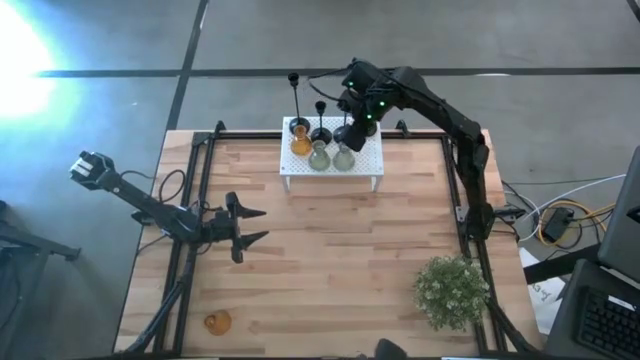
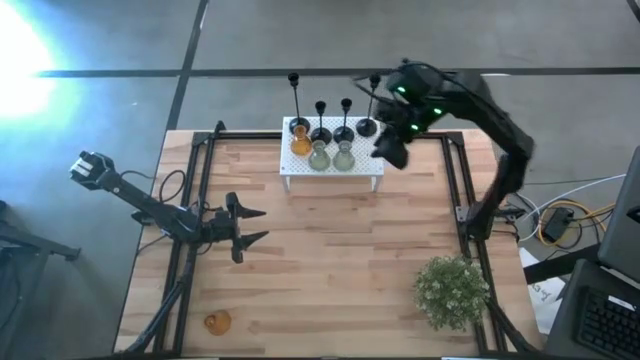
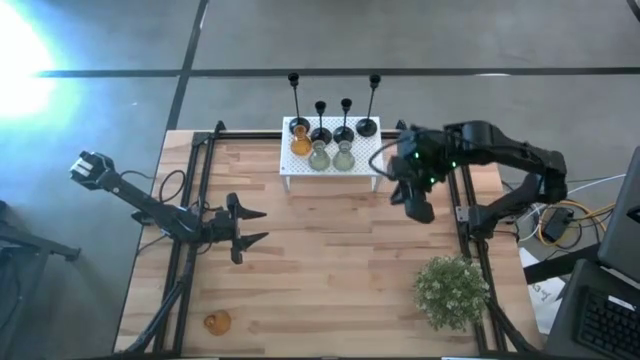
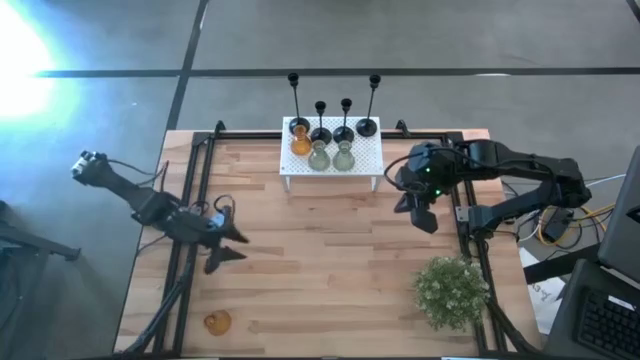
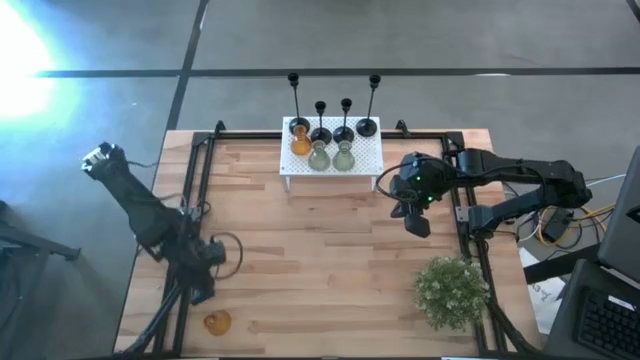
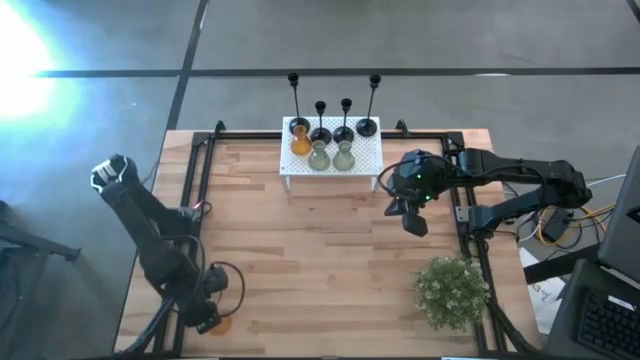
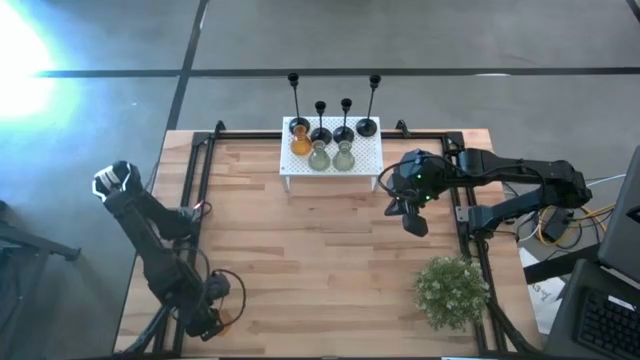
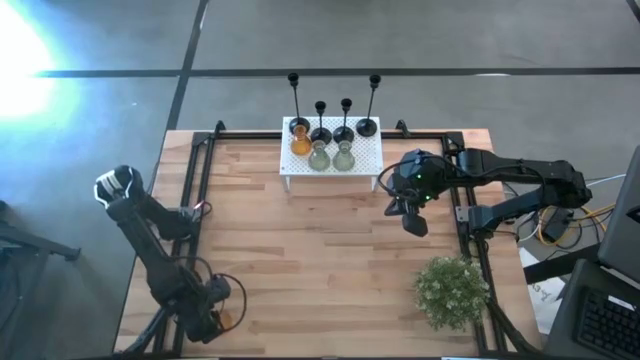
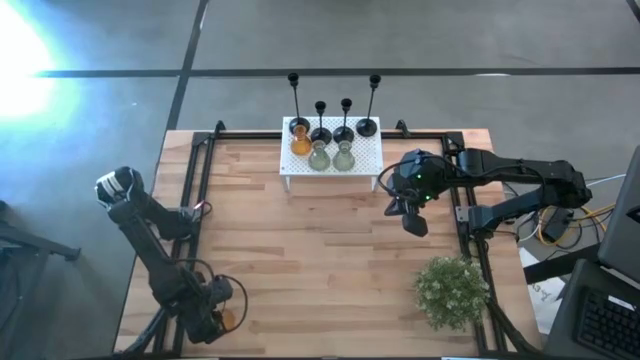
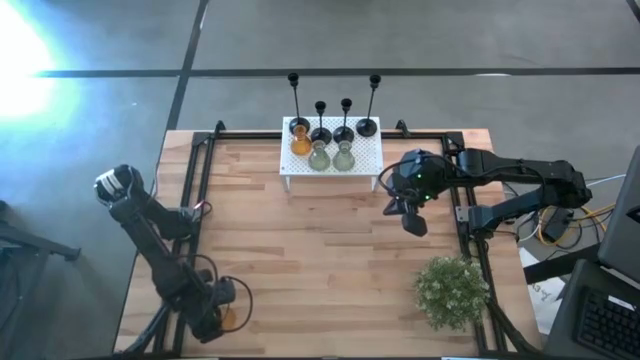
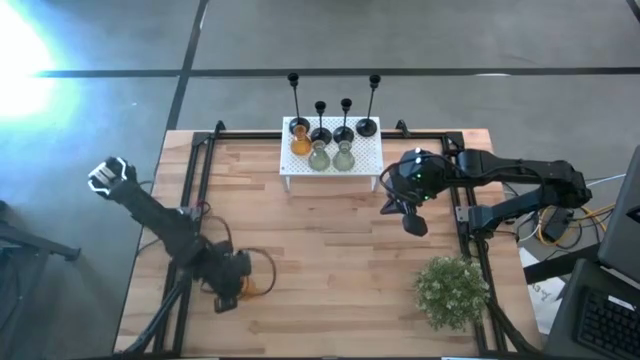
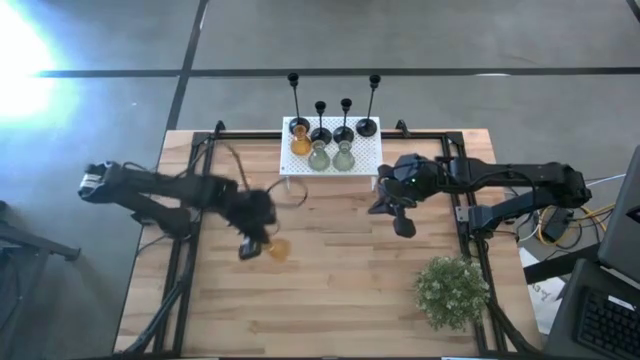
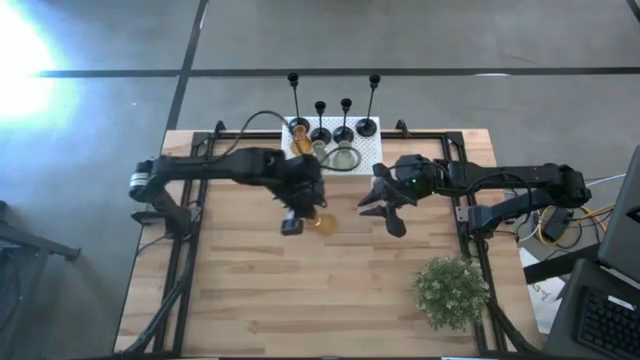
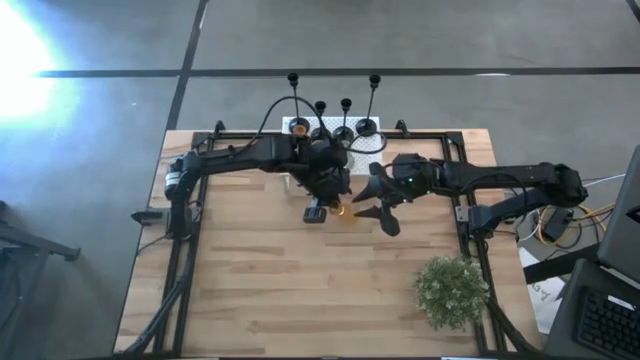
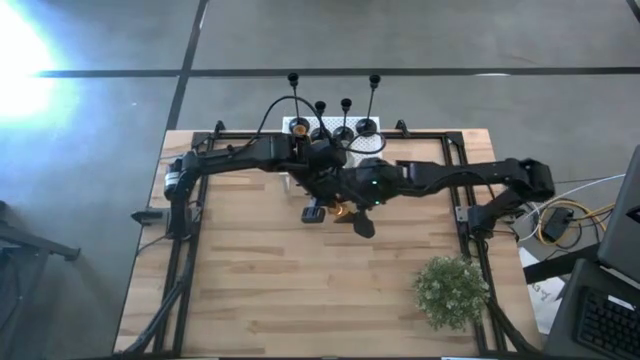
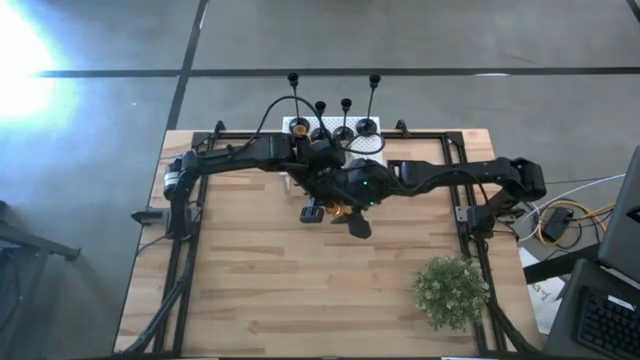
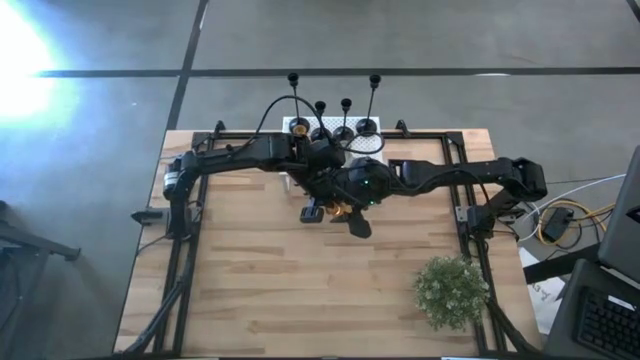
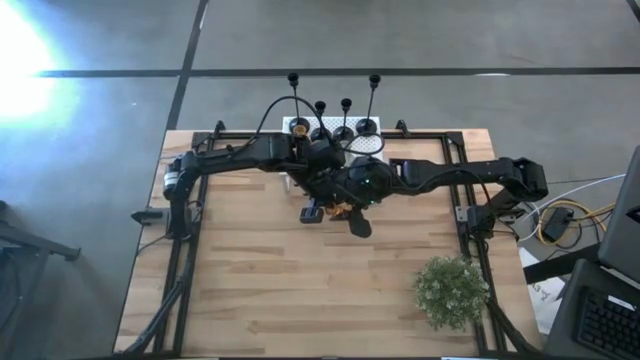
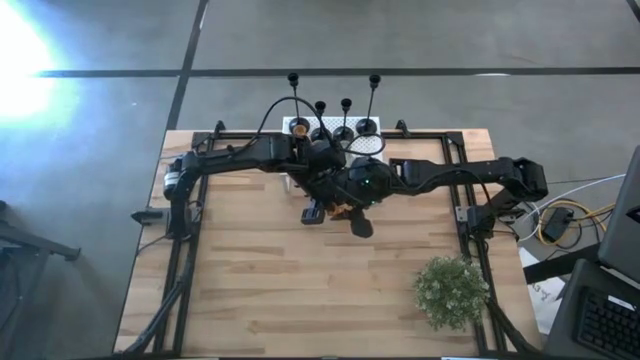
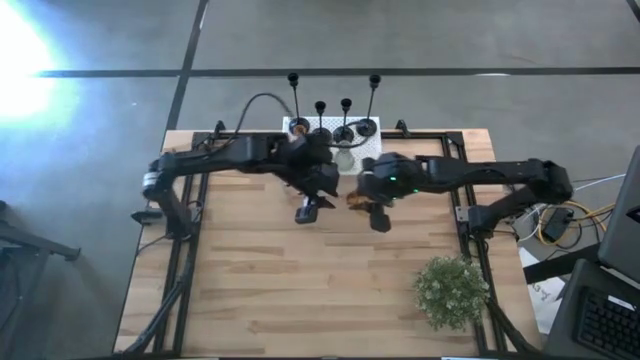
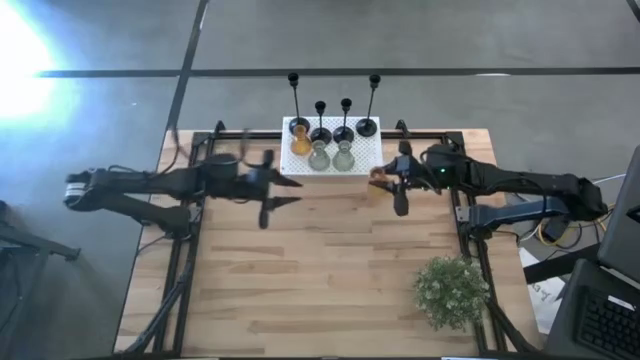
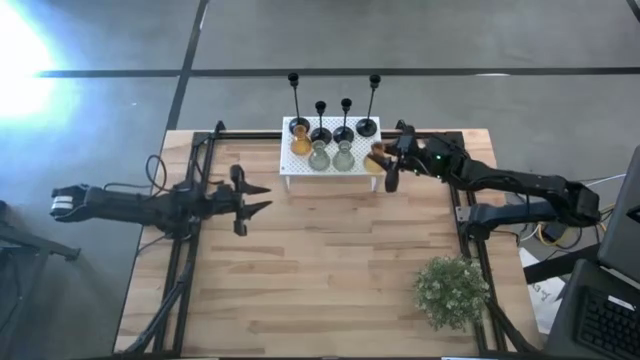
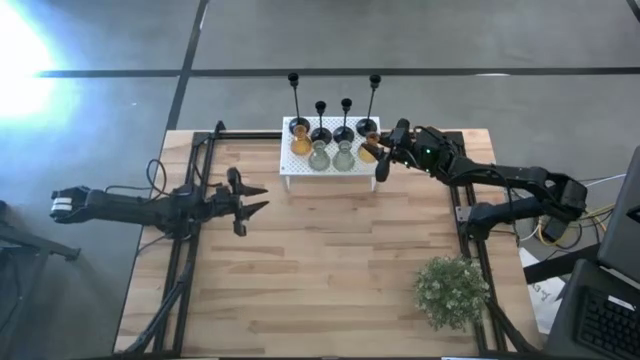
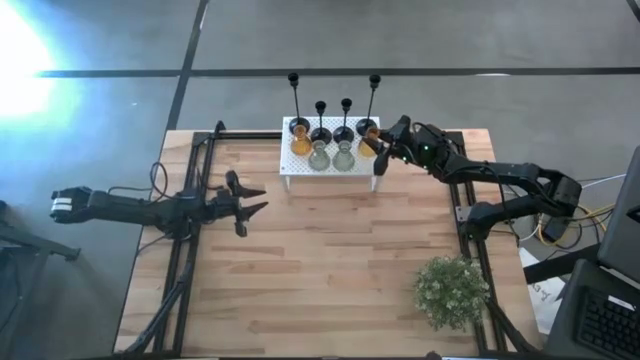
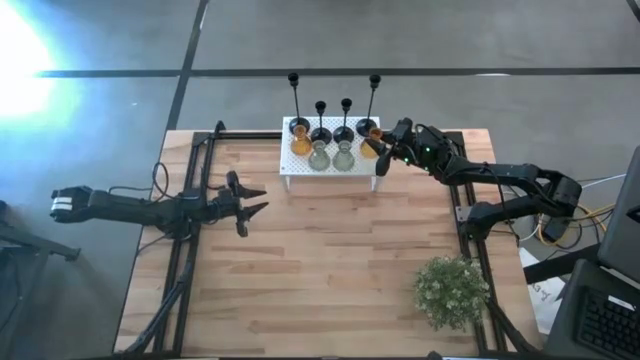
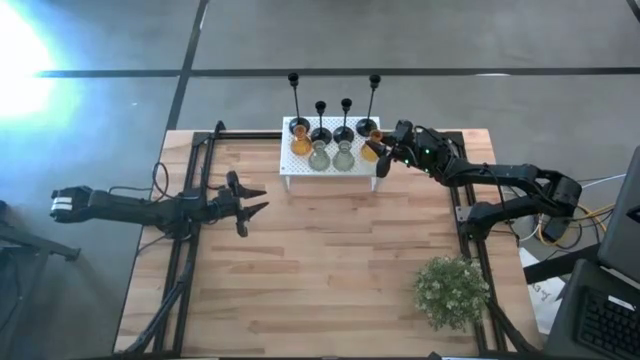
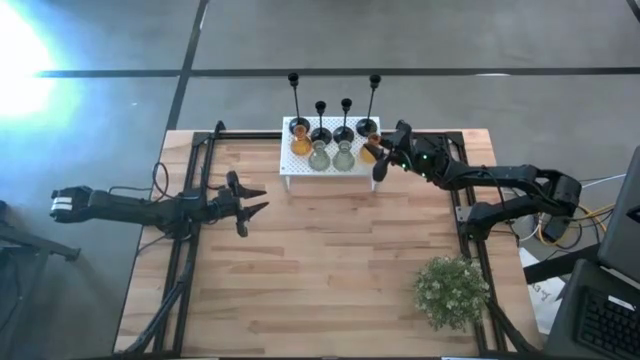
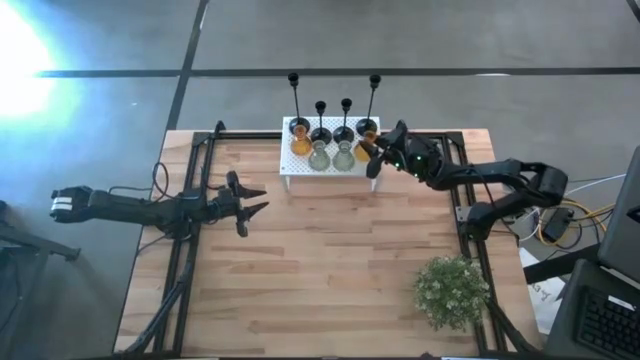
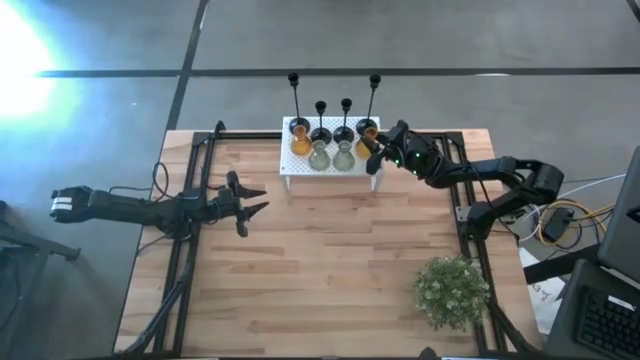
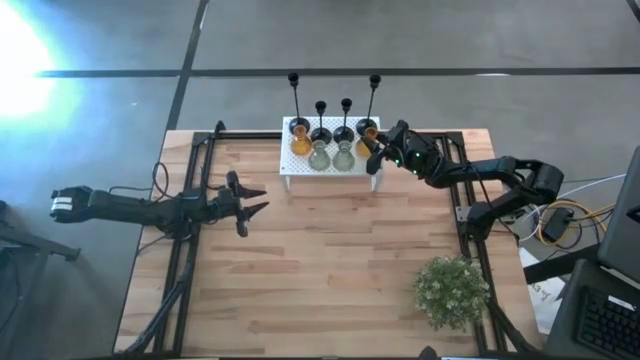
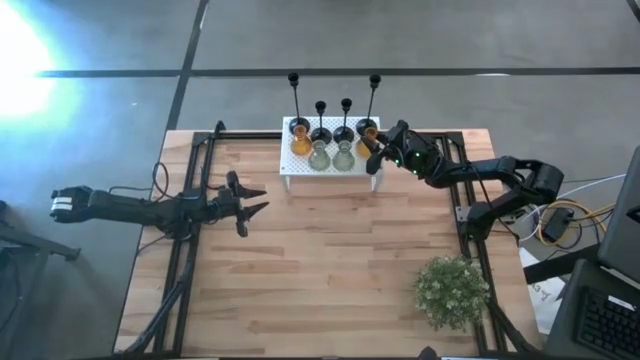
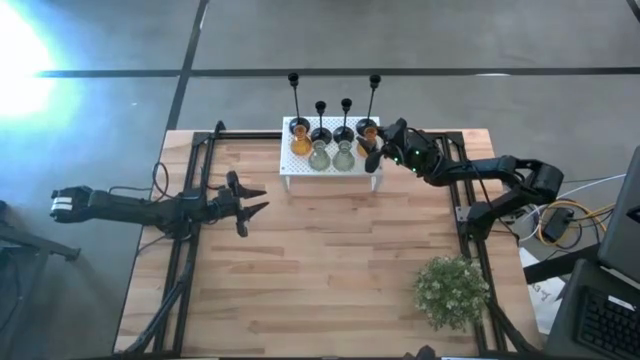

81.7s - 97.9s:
Task: Pick & Place candle stick holders
Put the yellow glass candle holder on the shelf

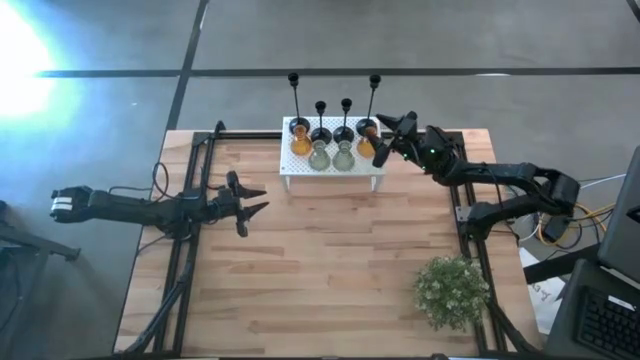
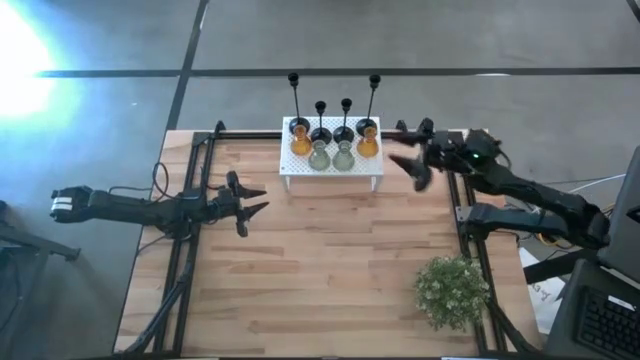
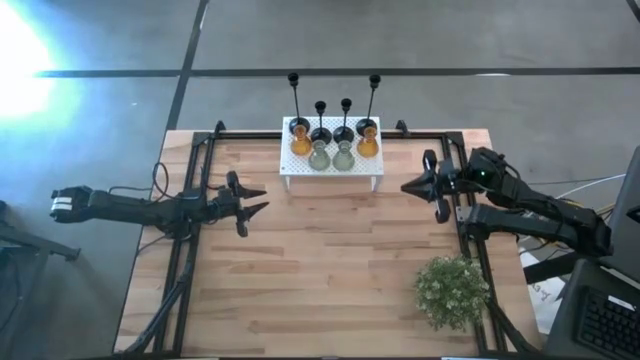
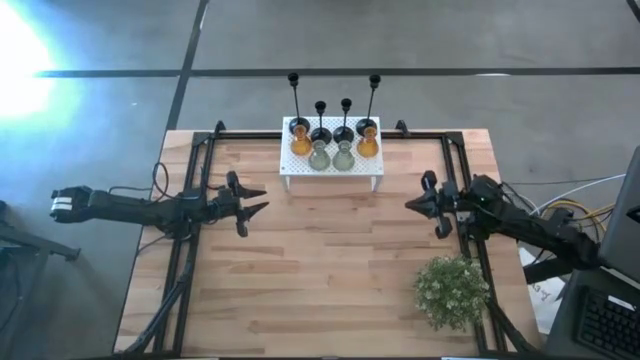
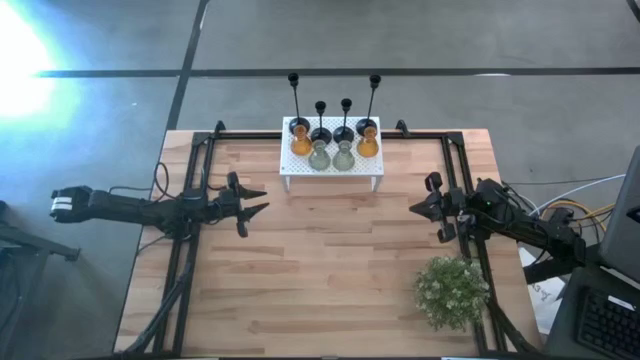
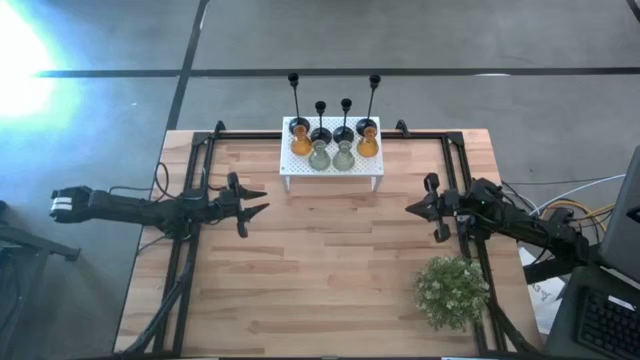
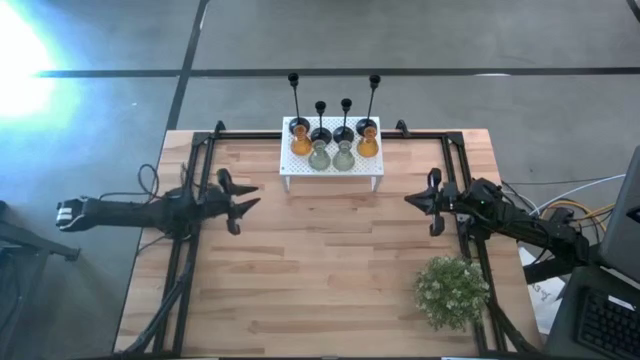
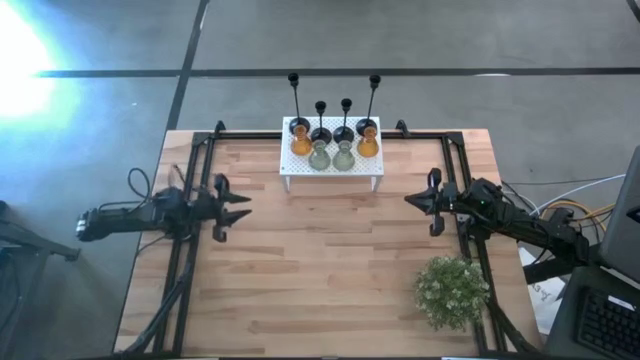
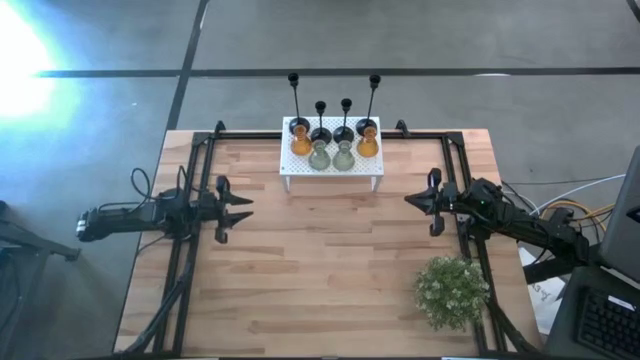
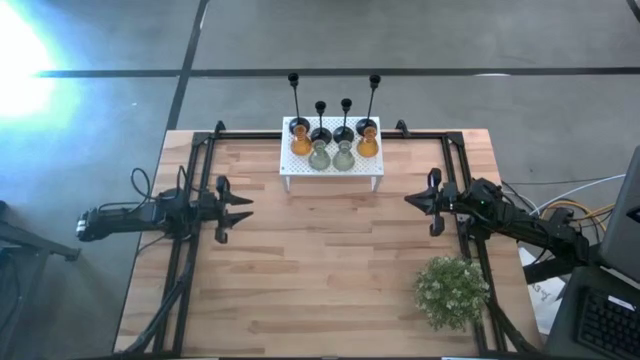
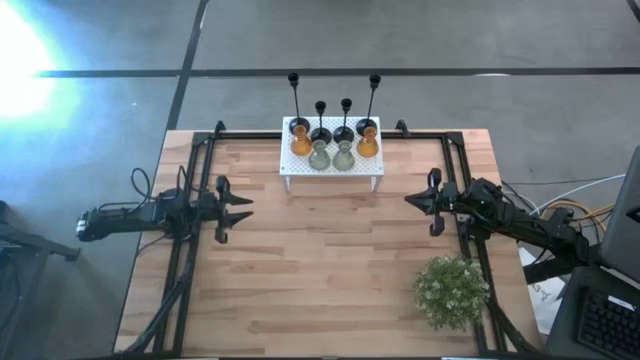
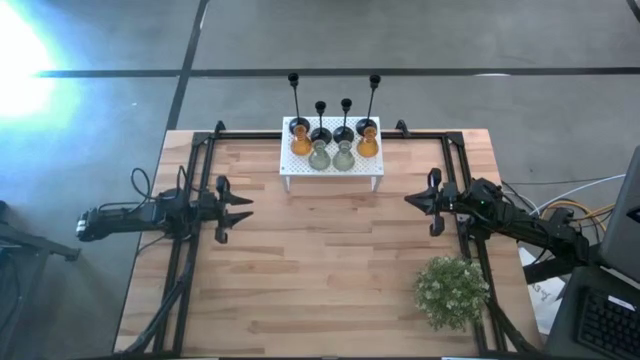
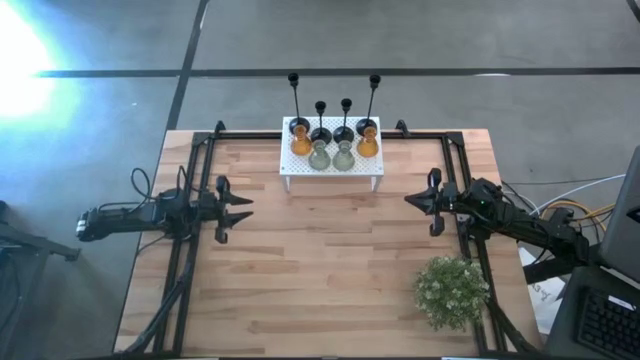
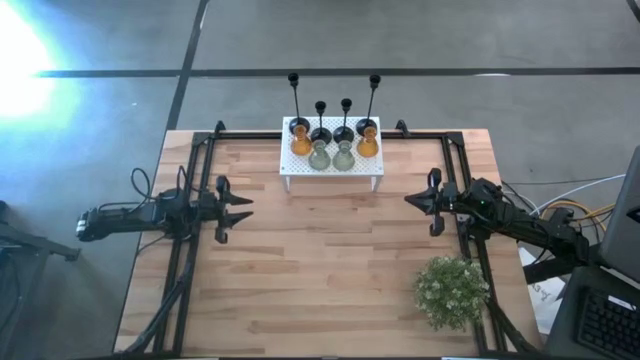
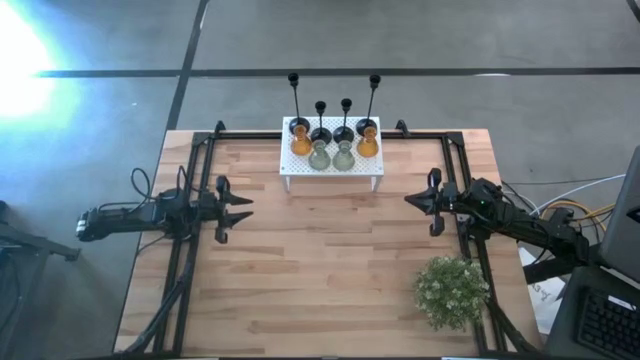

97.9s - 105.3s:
Return to Home Position
